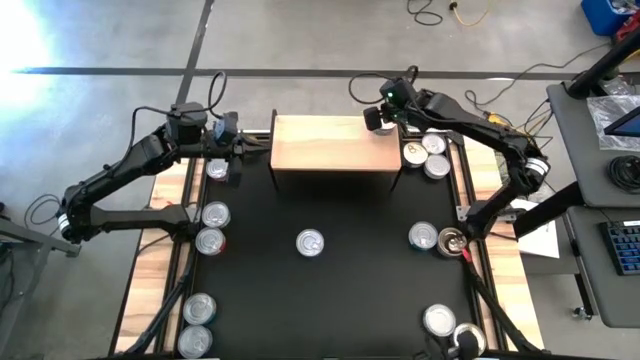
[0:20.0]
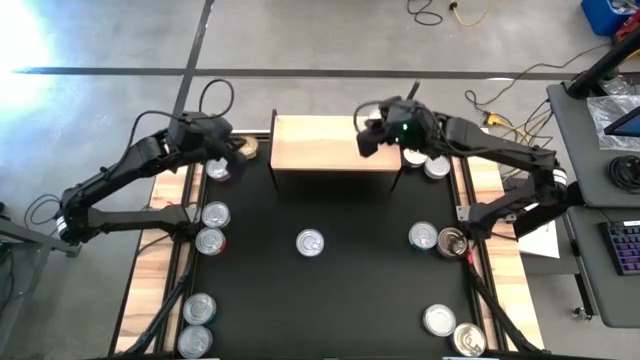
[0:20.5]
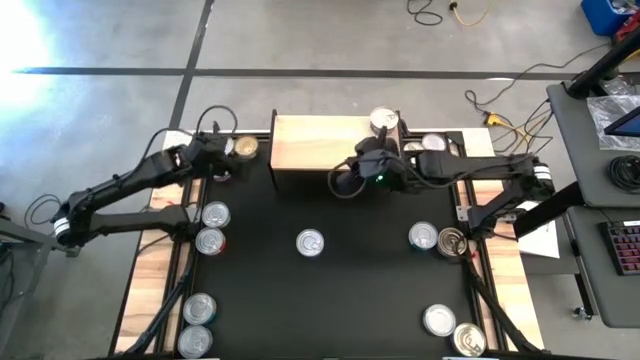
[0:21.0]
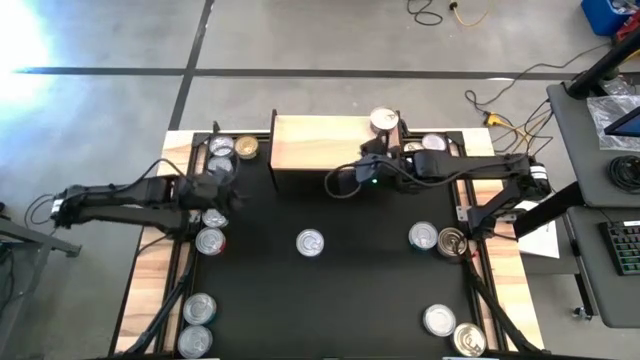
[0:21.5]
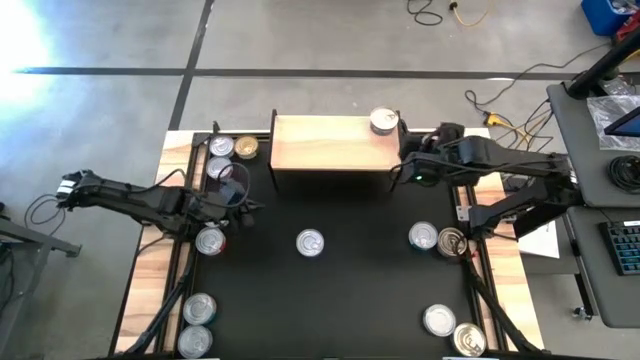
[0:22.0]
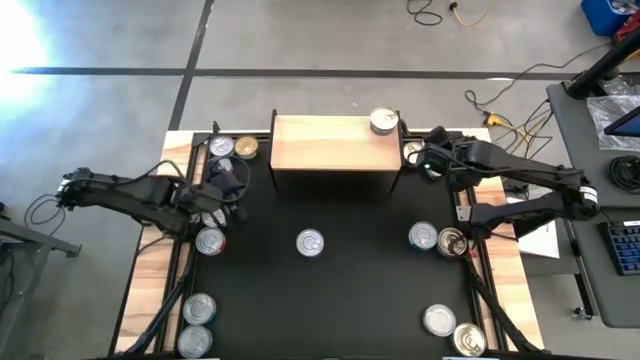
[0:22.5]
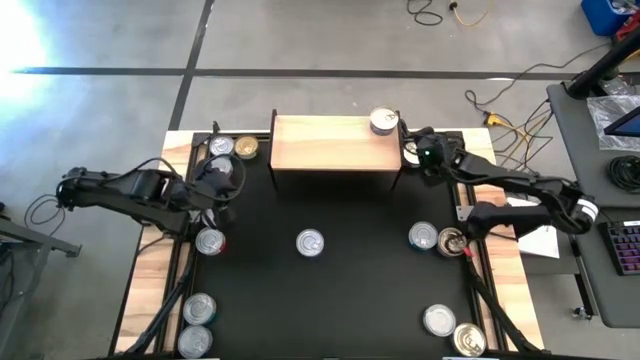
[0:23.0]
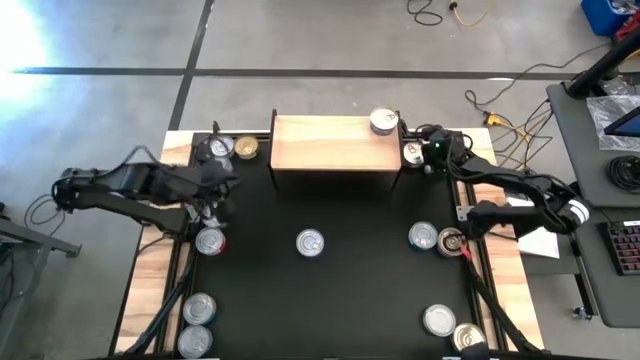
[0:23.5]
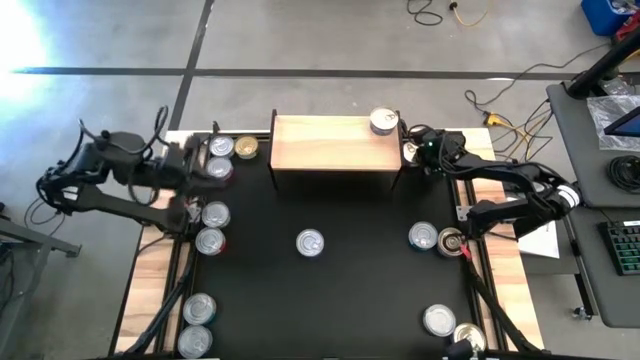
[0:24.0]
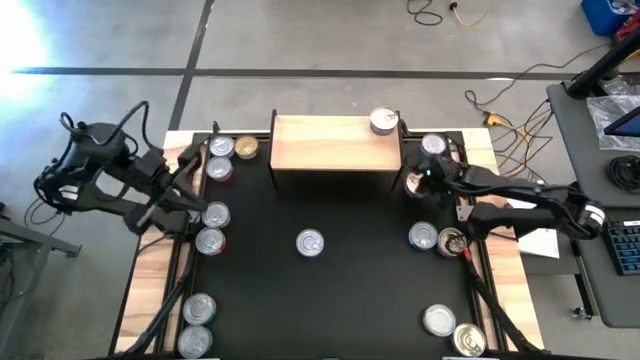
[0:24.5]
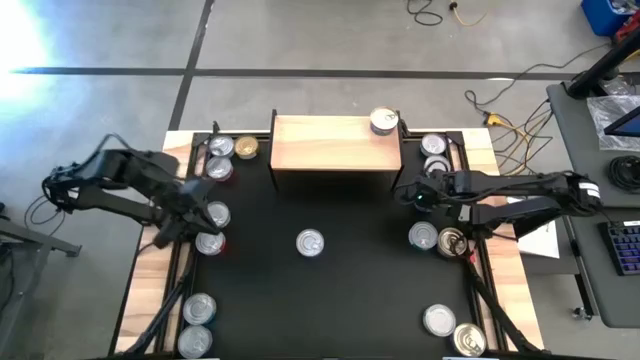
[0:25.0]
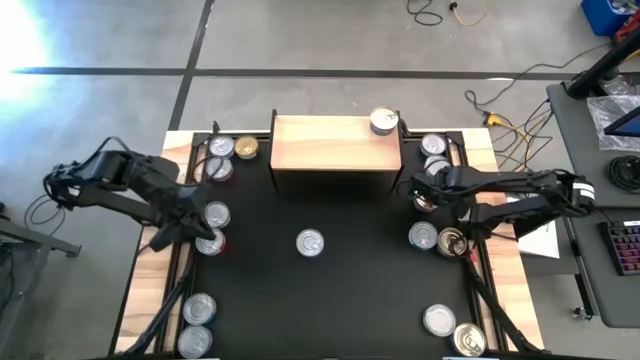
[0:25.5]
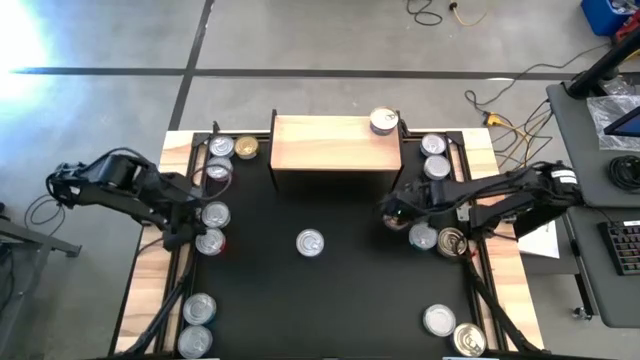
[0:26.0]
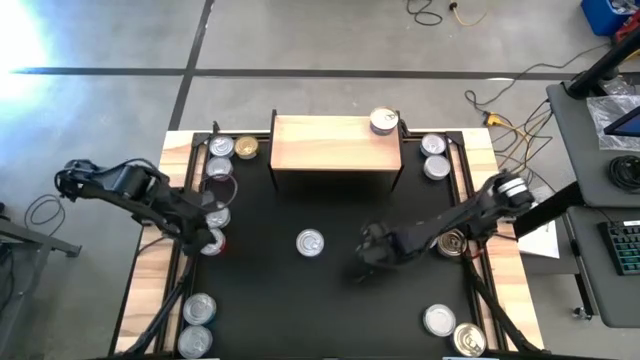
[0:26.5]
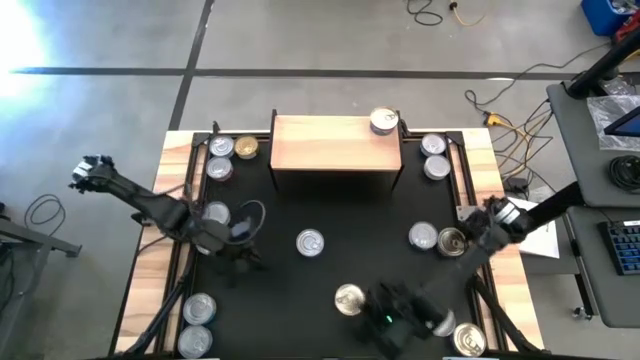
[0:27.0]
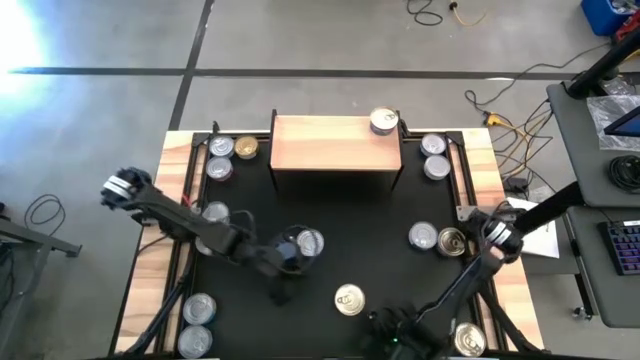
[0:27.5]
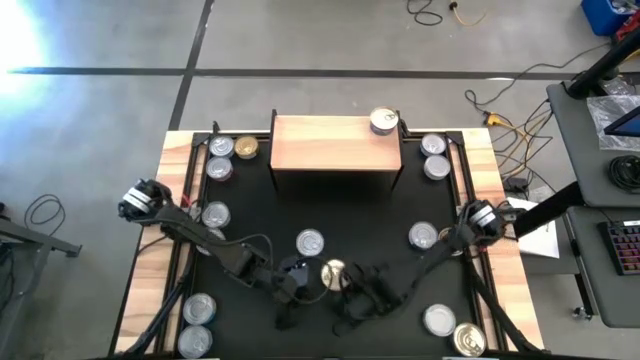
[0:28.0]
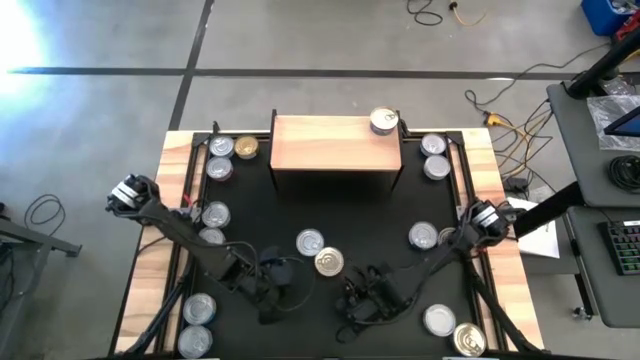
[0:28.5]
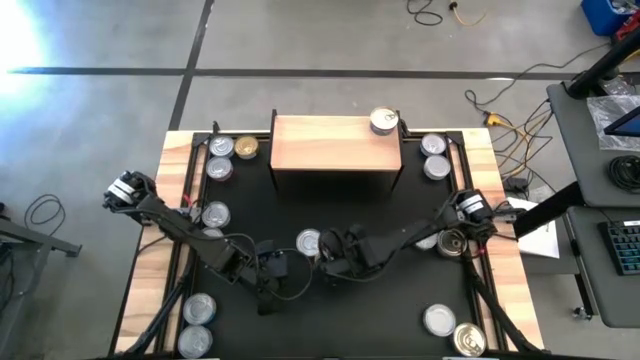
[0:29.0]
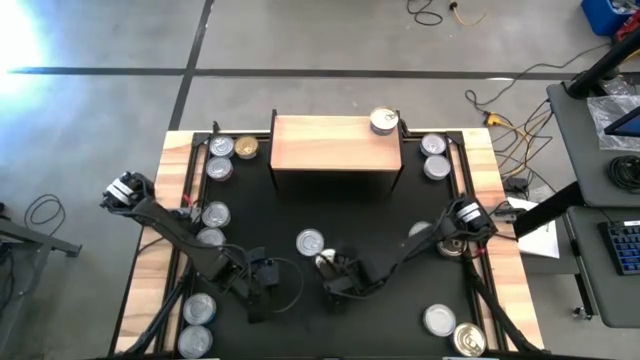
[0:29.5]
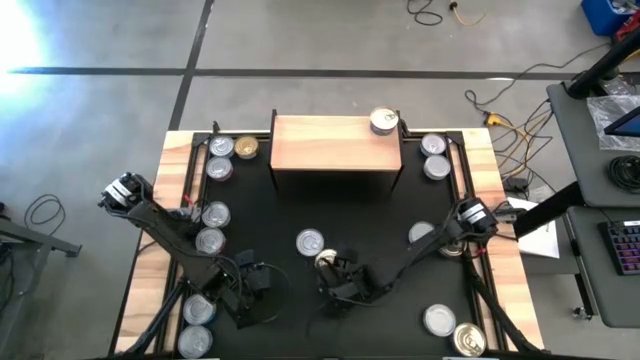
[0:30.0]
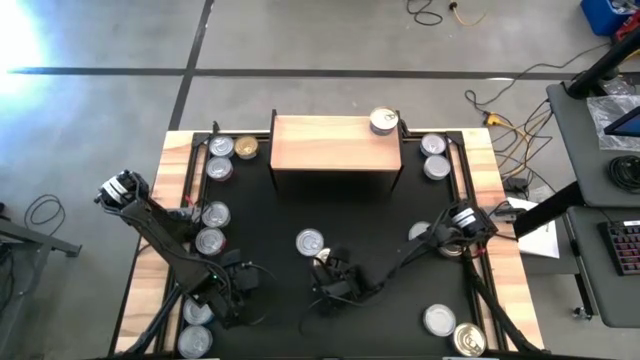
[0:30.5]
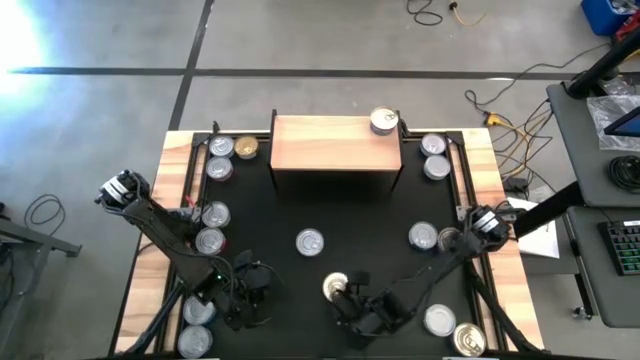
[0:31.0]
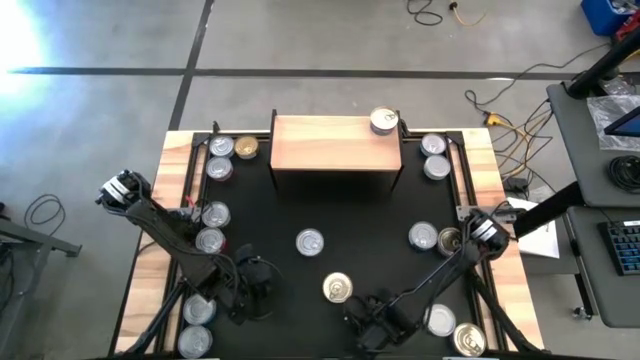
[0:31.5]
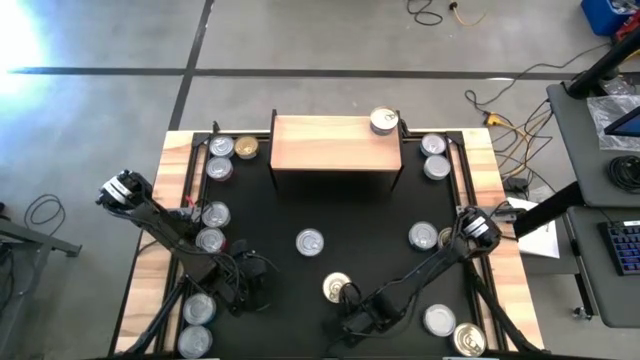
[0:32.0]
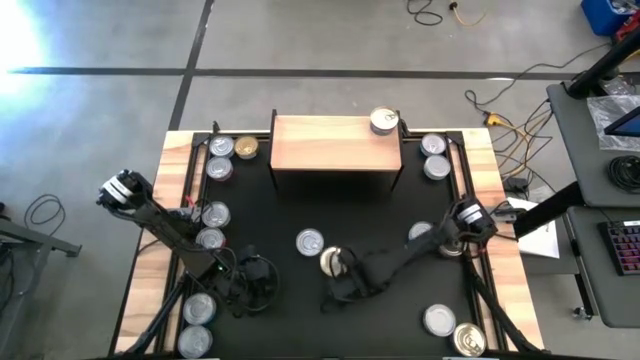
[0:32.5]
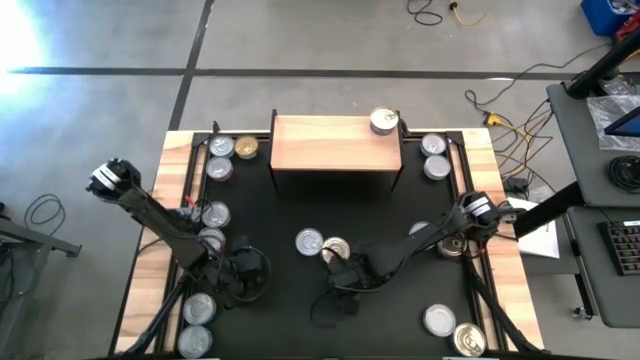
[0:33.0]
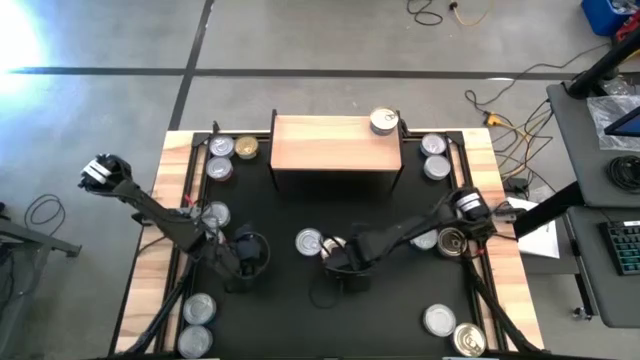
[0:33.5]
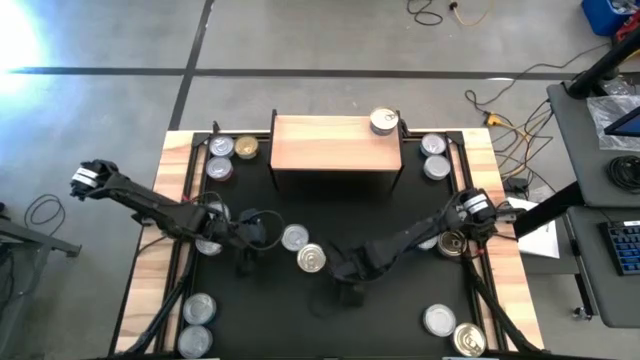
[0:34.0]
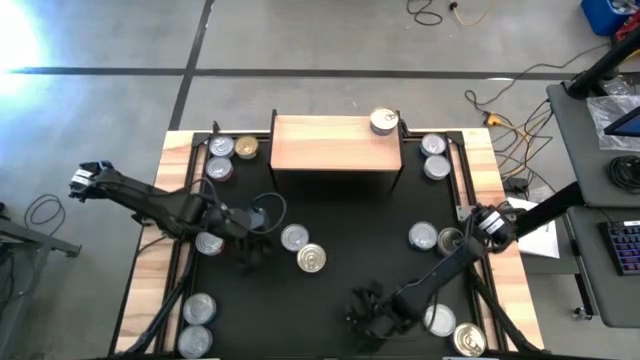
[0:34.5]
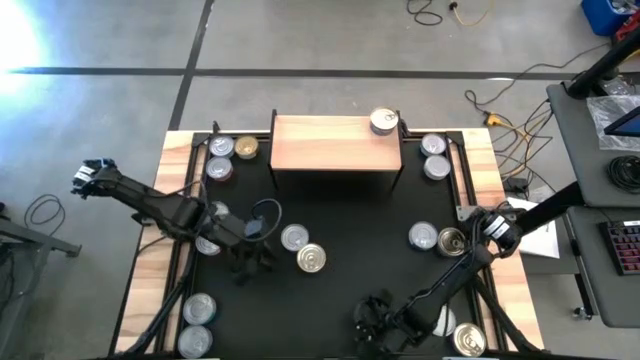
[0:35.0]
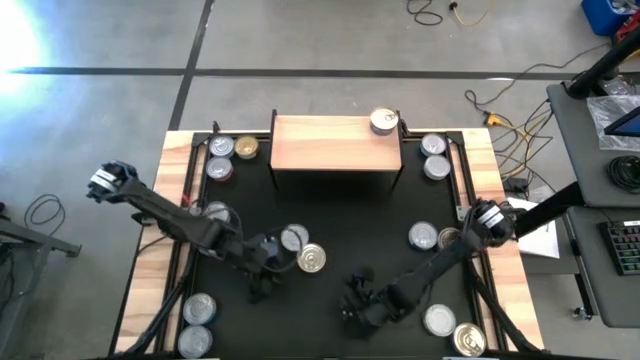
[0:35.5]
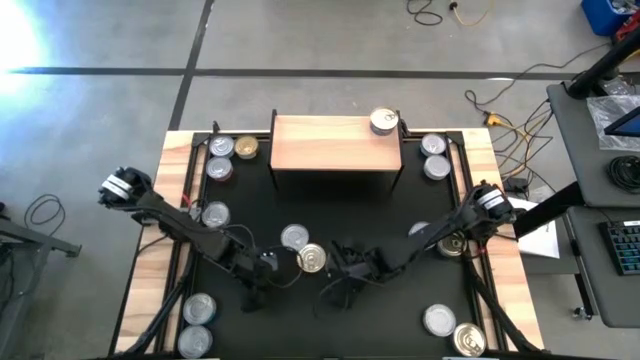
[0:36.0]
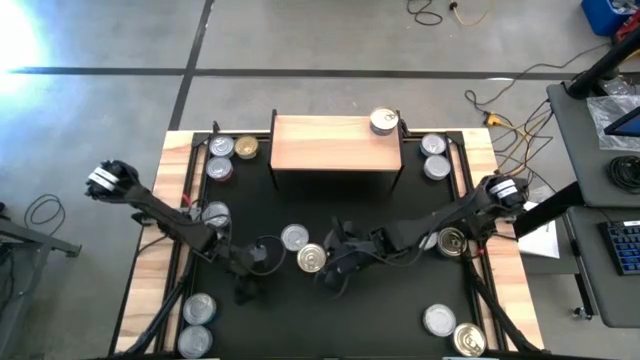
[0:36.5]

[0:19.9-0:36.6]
Task: Stack canned seafood by type on shelf
Stack the top blue and pink tuna can on top of the blue and pink tuna can

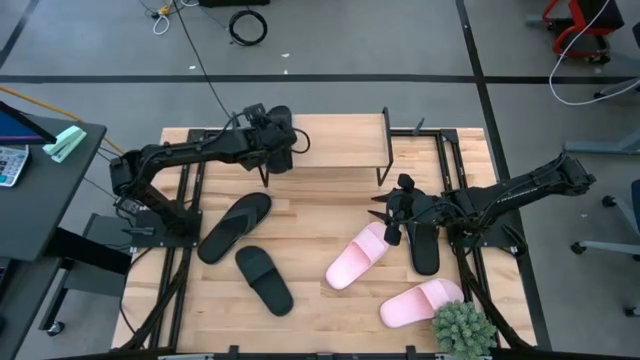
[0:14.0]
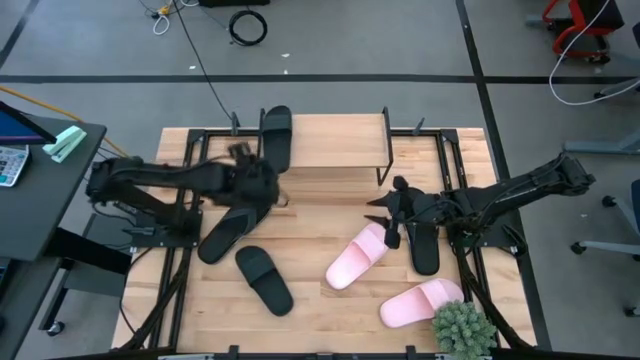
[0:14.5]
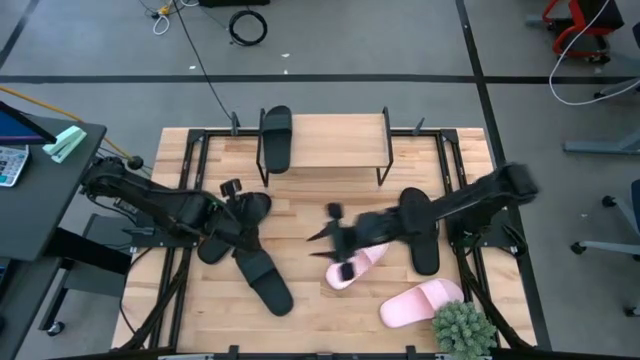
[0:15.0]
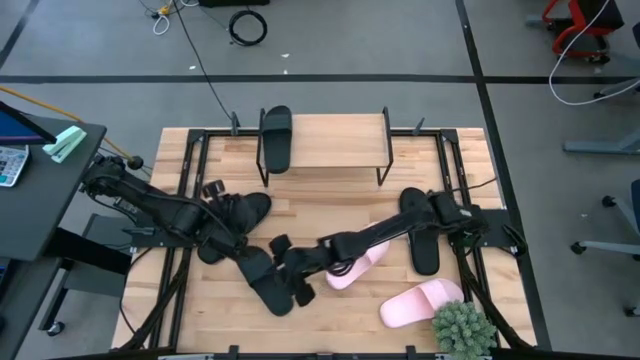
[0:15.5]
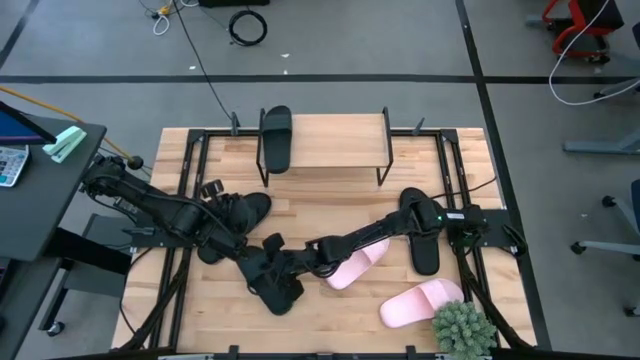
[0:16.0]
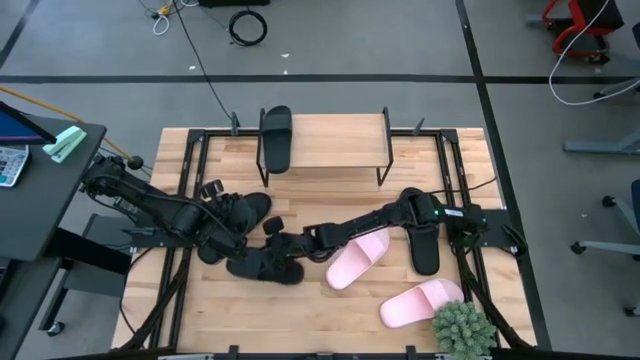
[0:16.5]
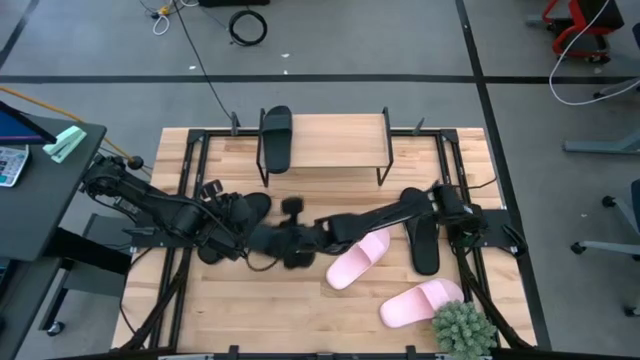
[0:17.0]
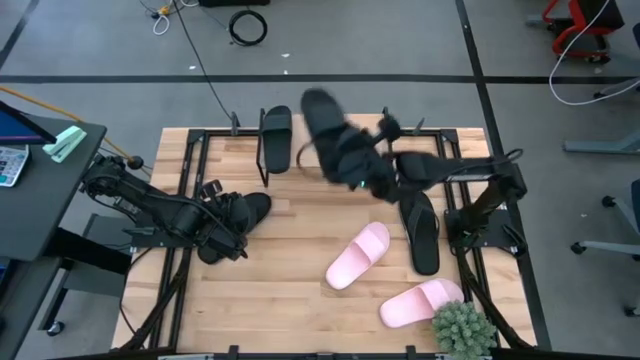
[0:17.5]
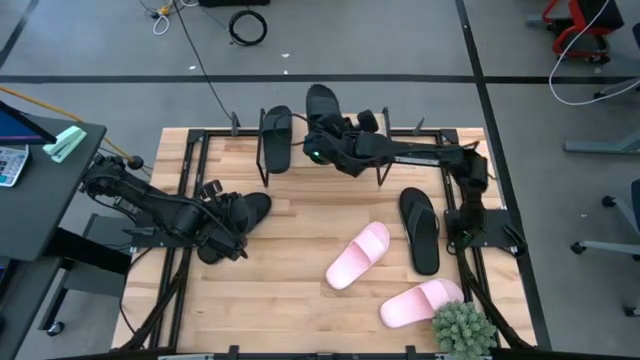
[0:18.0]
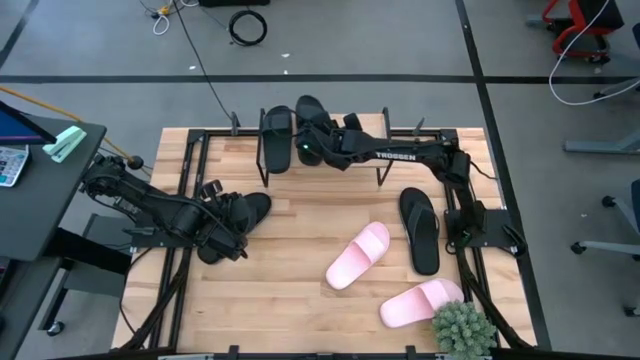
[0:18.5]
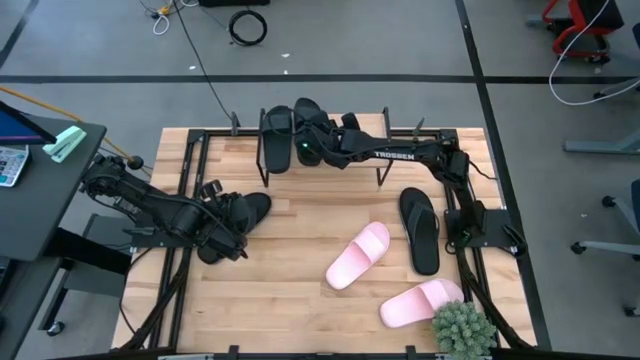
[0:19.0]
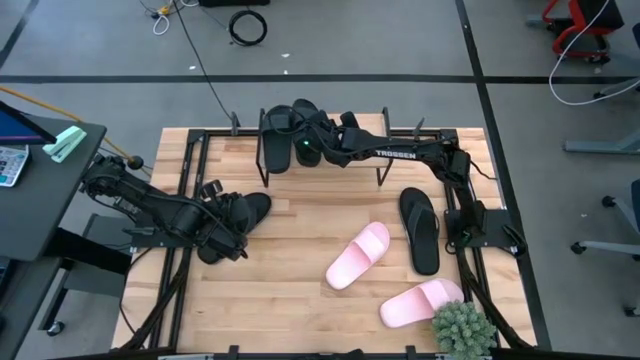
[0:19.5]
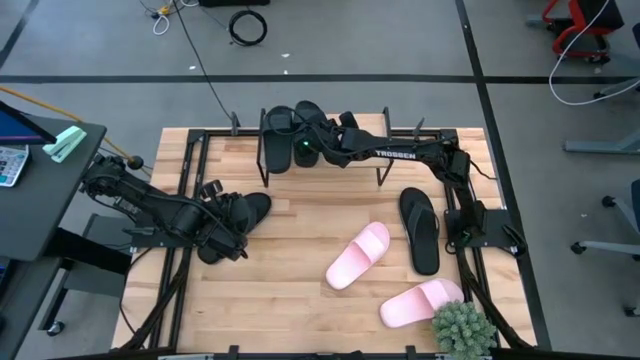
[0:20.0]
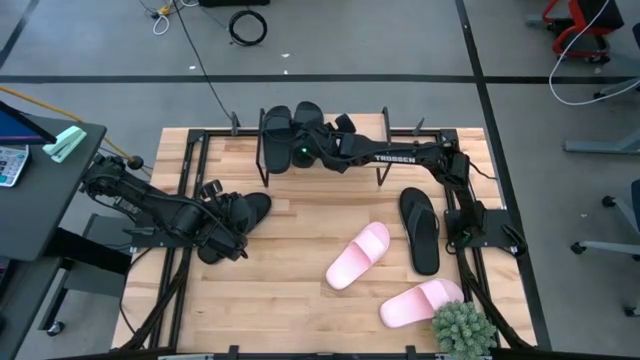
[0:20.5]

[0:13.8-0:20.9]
Task: Pick and place slides into the shelf
Put the black slider on the shelf
